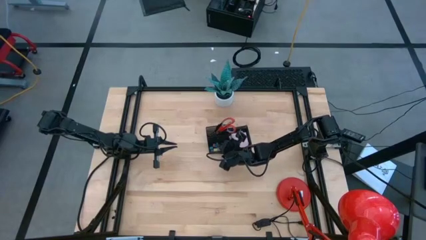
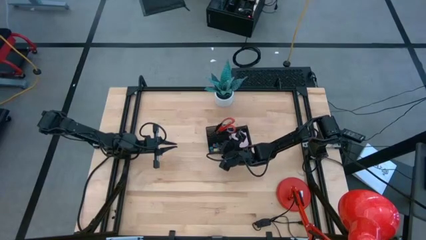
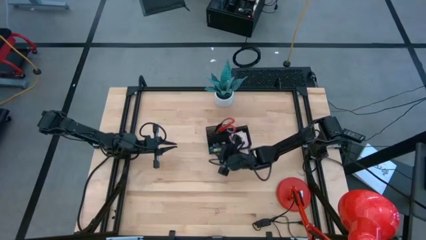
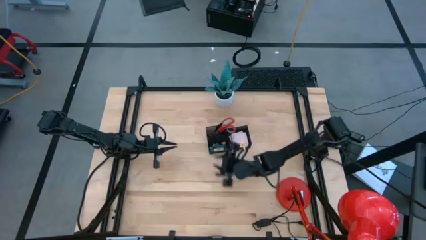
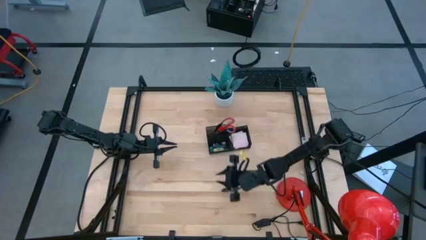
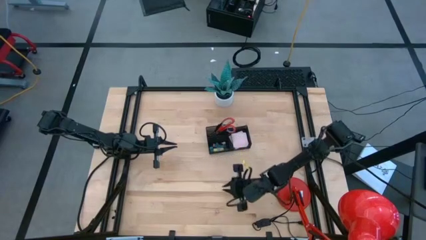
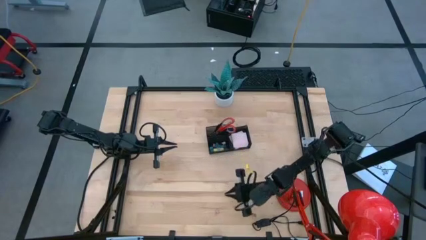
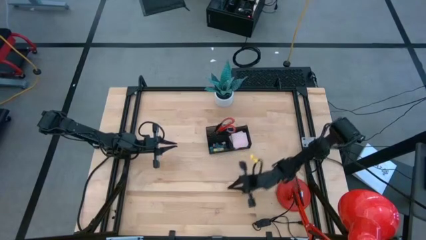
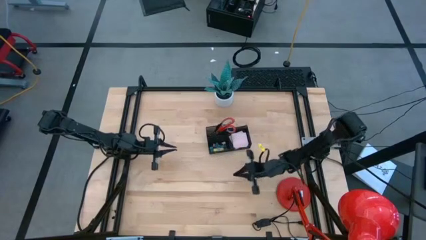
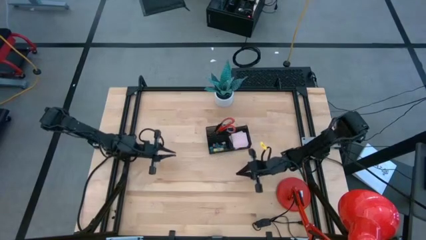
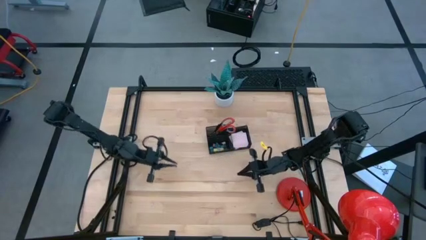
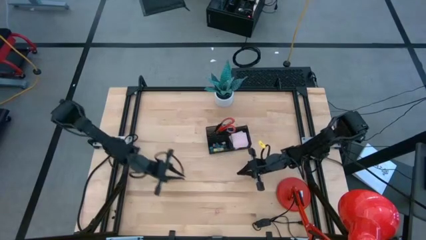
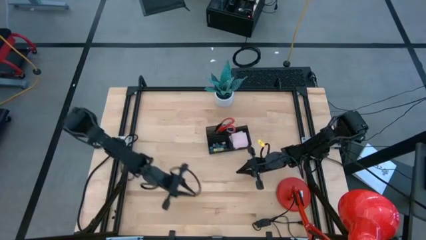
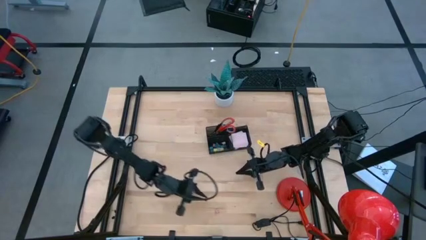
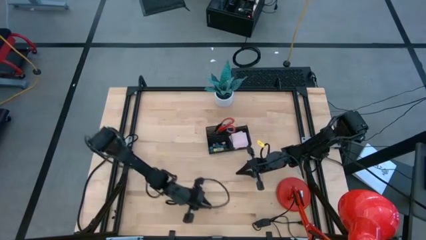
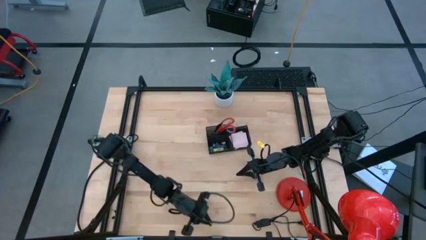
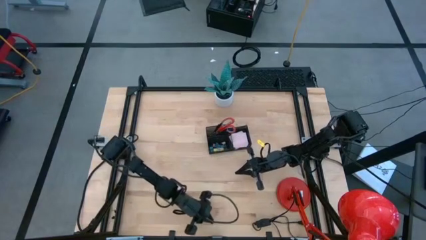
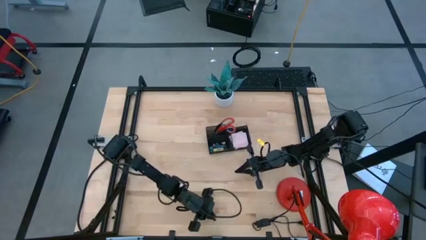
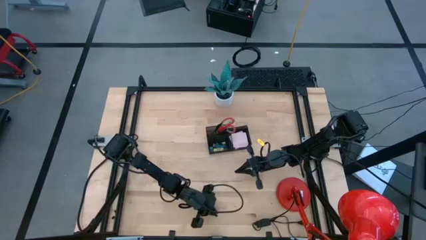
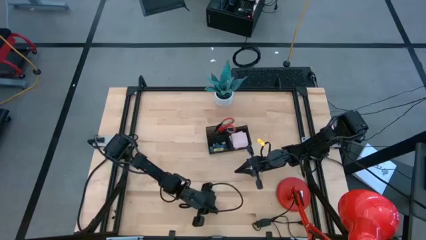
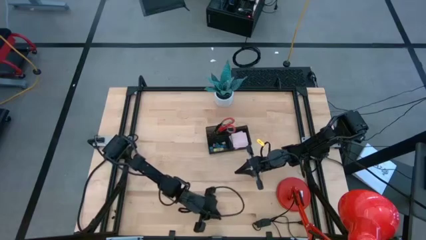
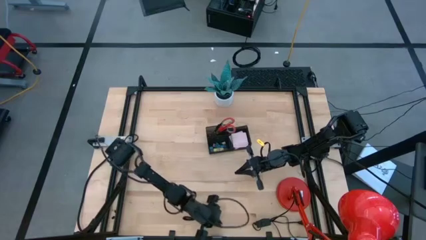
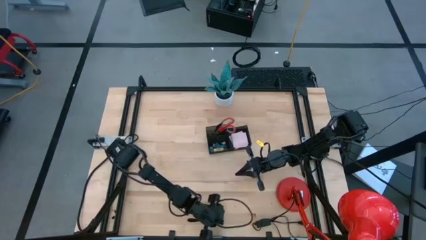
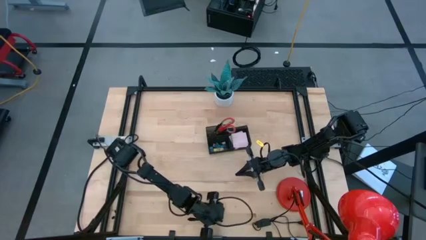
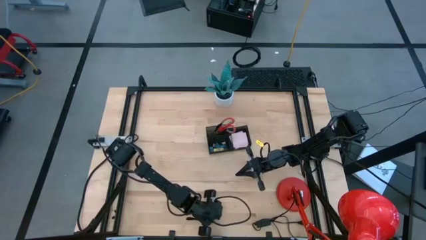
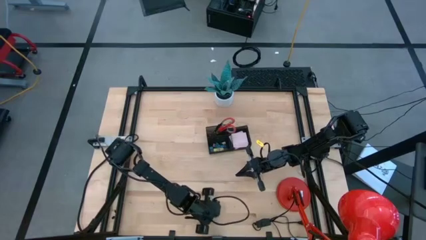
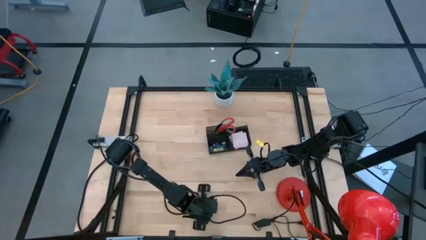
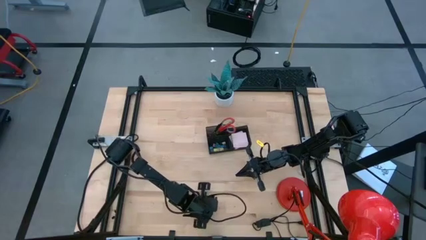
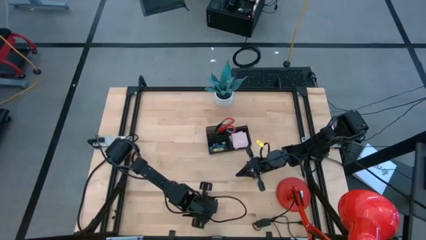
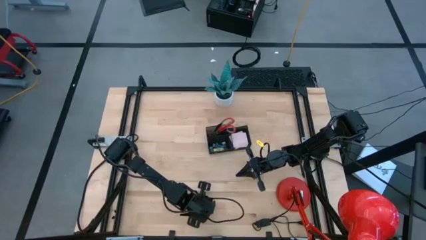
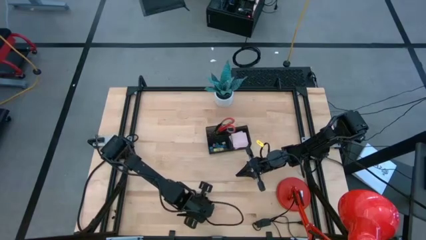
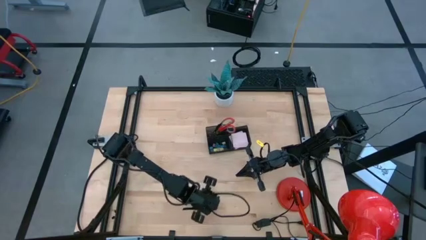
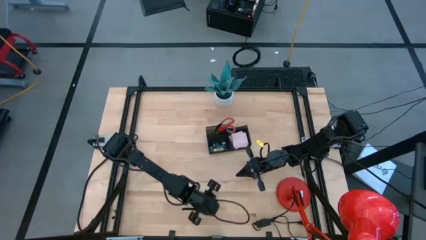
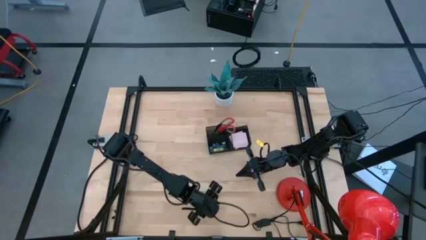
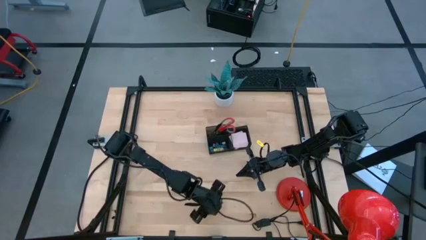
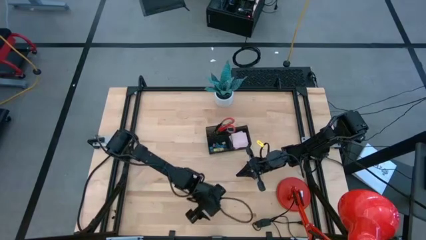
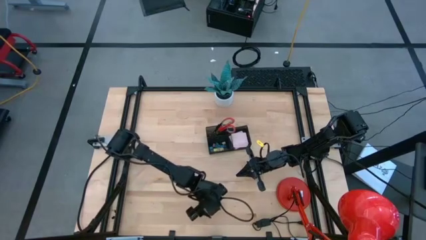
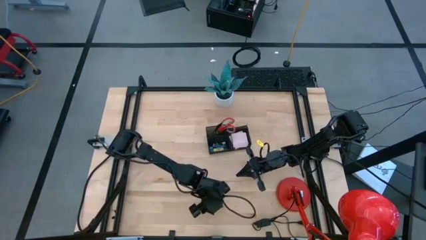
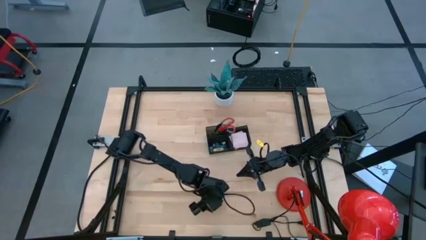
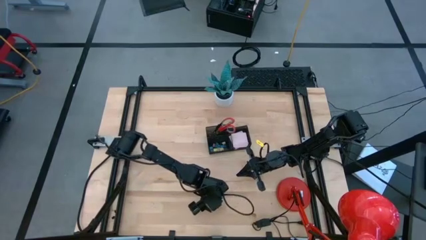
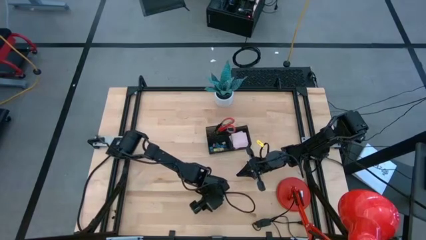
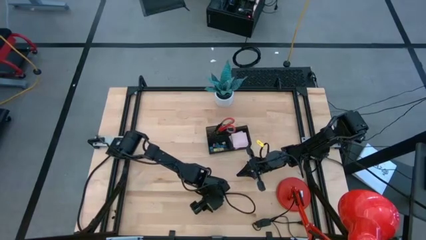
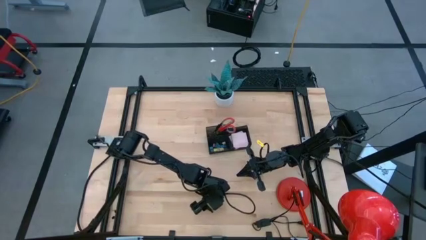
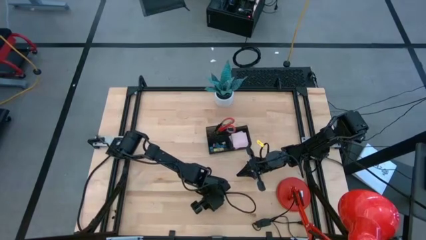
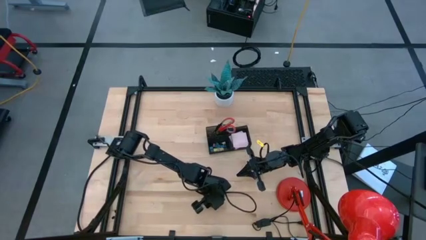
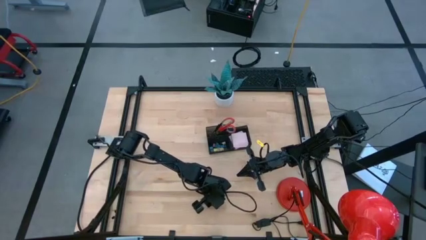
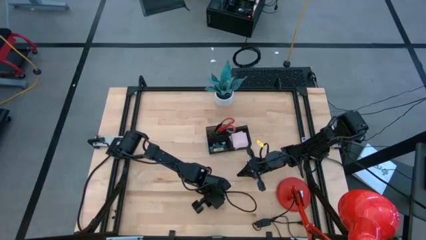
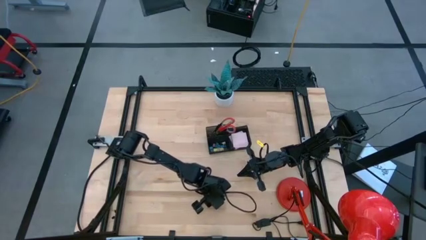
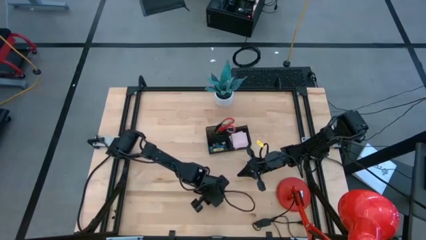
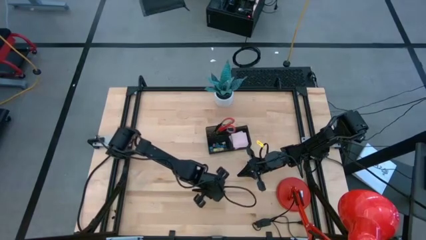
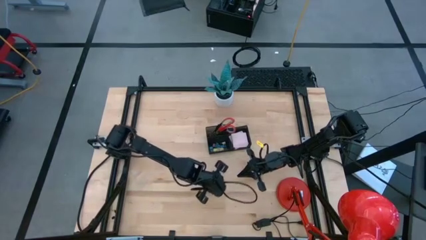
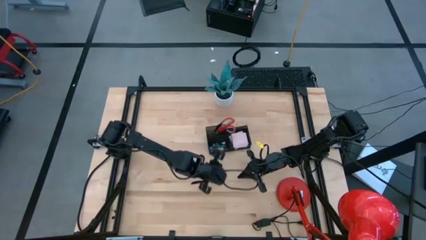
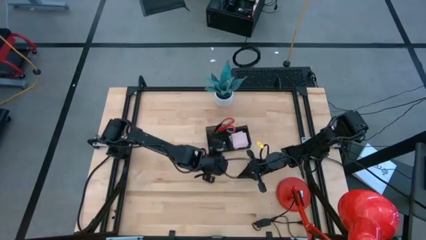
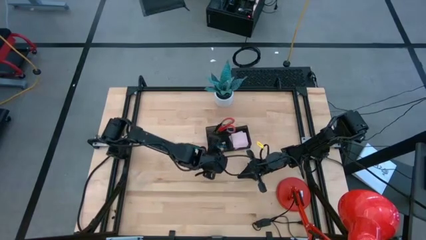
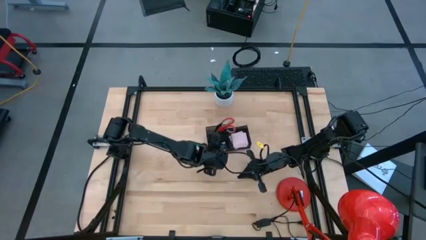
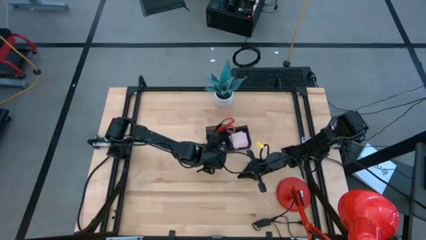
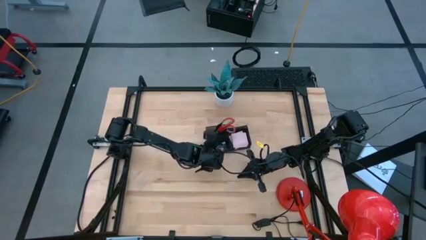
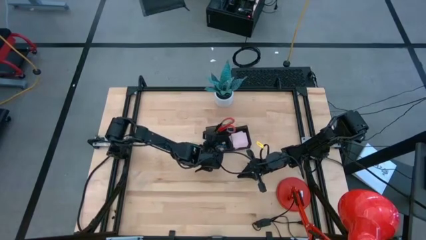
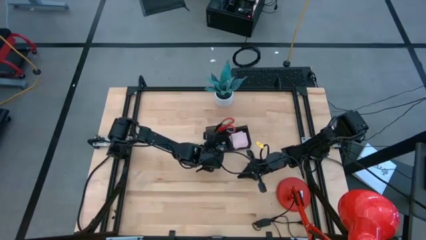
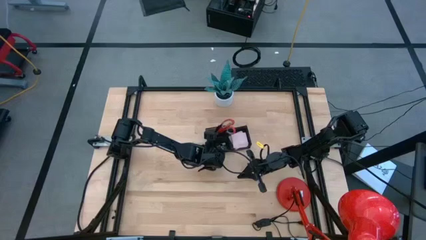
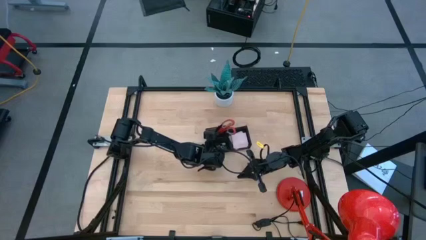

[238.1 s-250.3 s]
Task: Pick and place office supplies into organizer
Put the pink binder clip into the black desk organizer

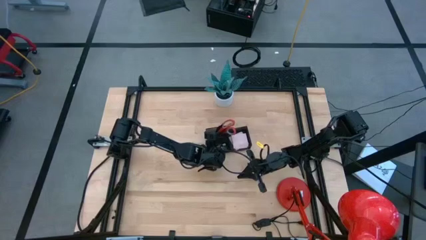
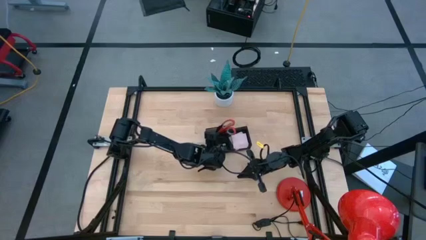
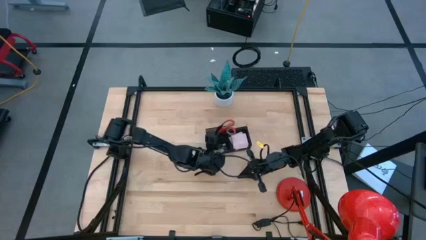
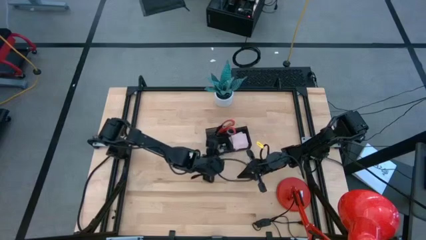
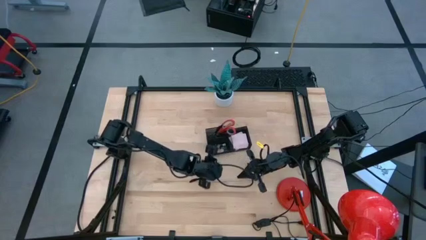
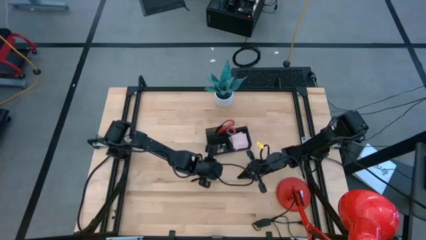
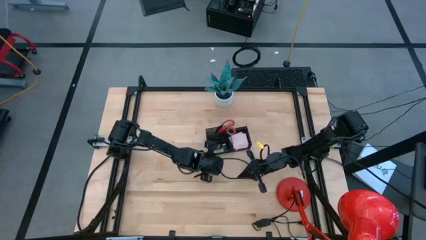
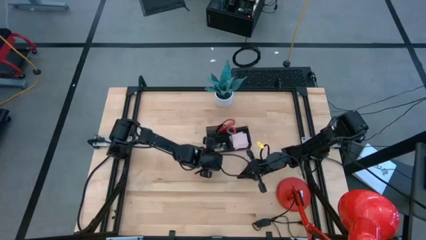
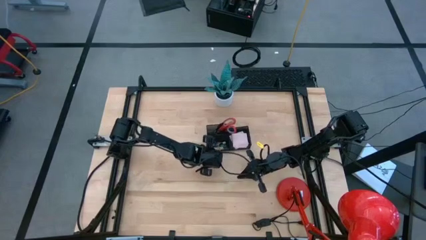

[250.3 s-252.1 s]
Adjust the black desk organizer

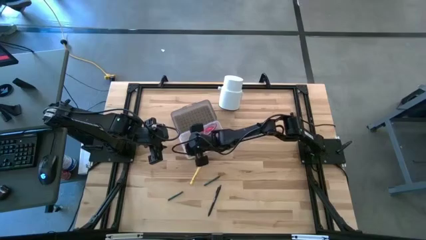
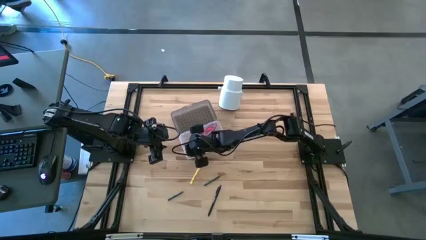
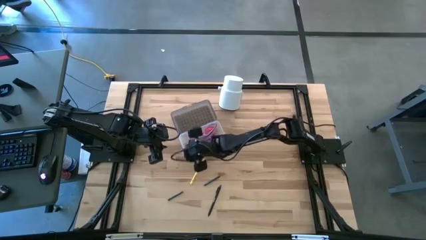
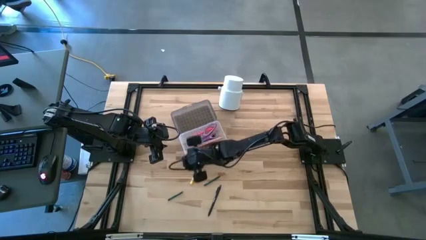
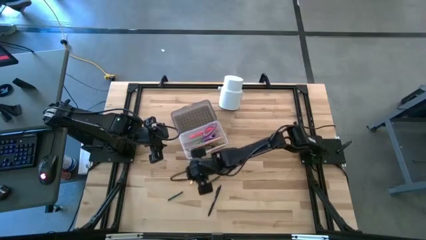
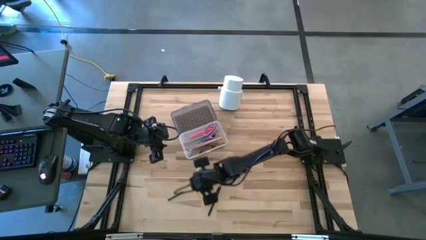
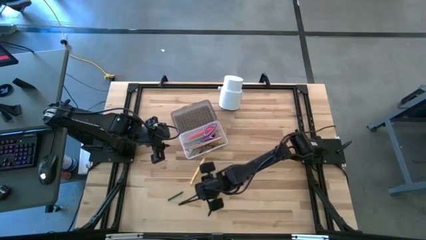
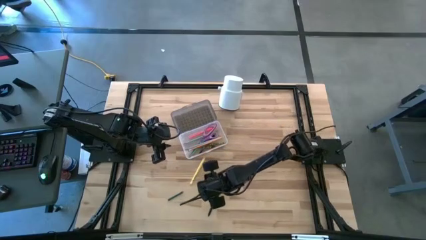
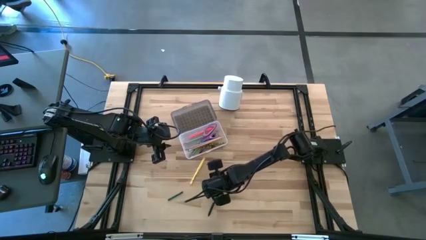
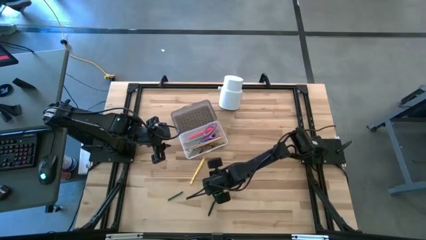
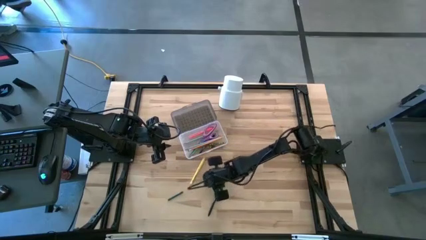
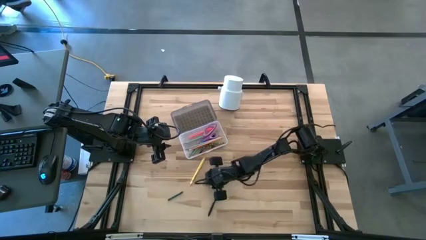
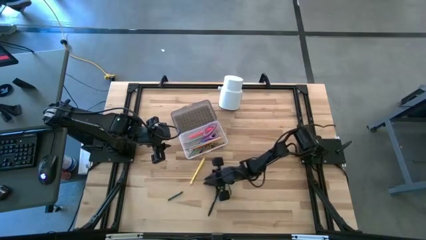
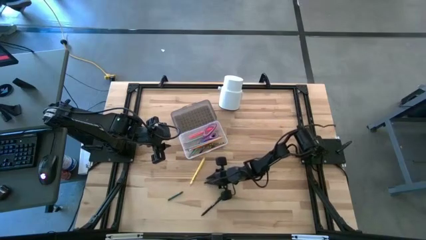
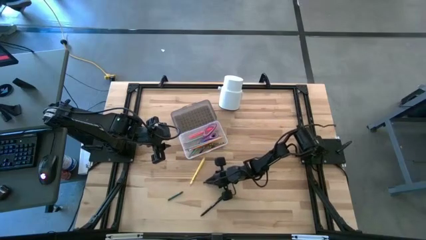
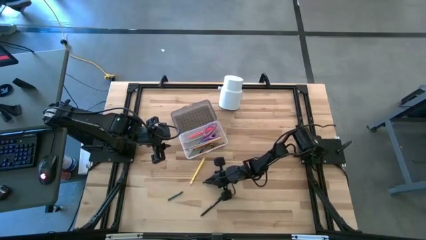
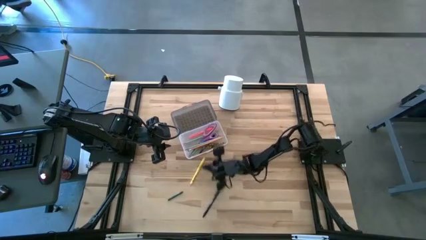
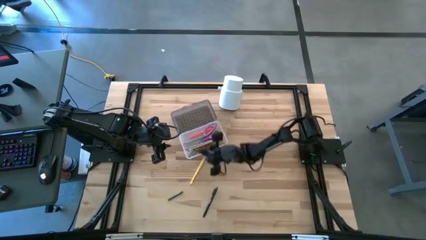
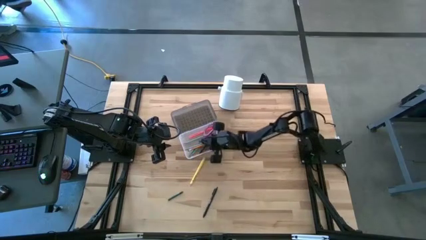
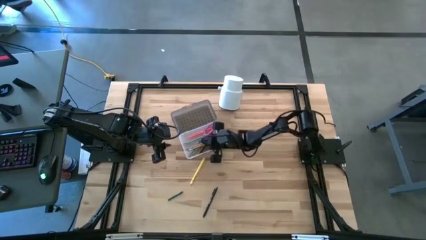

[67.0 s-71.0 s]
Task: Pick & place school supplies into a supply box
Put the right green crayon into the black supply box
